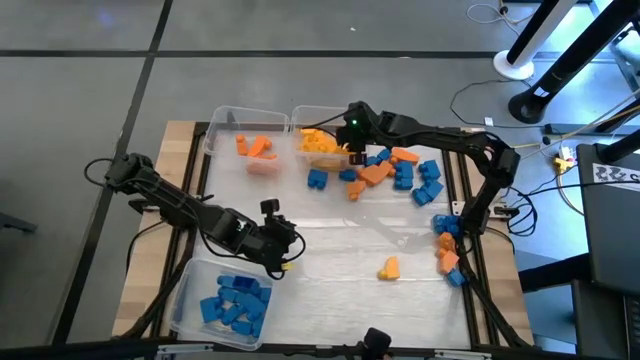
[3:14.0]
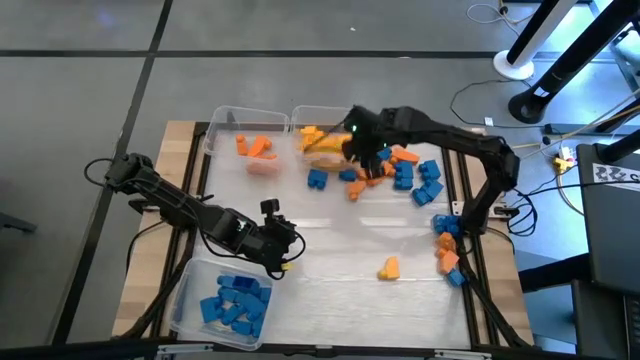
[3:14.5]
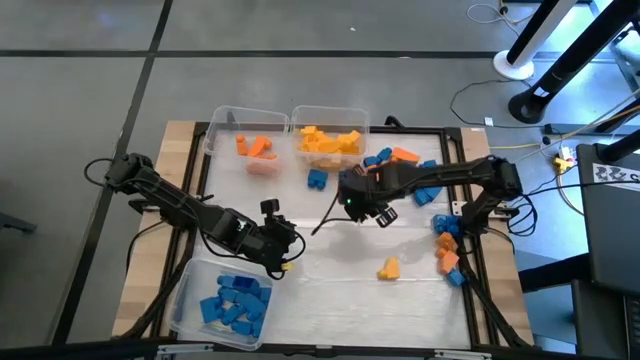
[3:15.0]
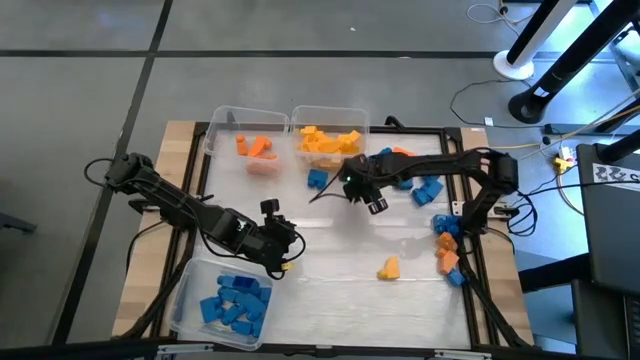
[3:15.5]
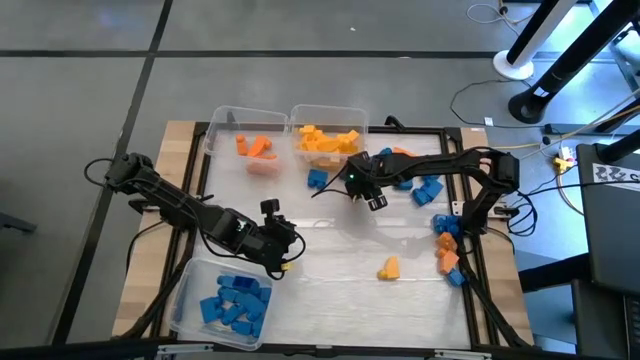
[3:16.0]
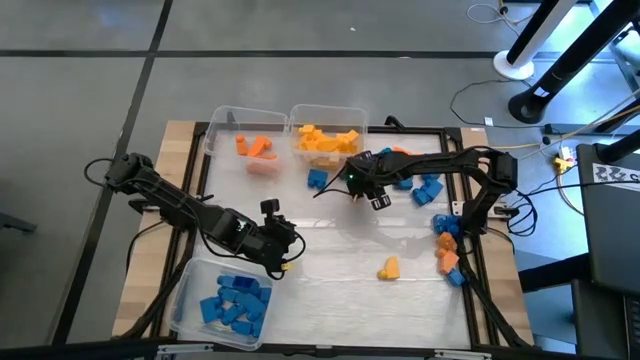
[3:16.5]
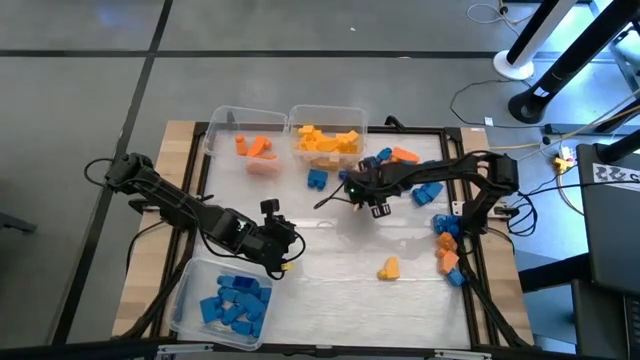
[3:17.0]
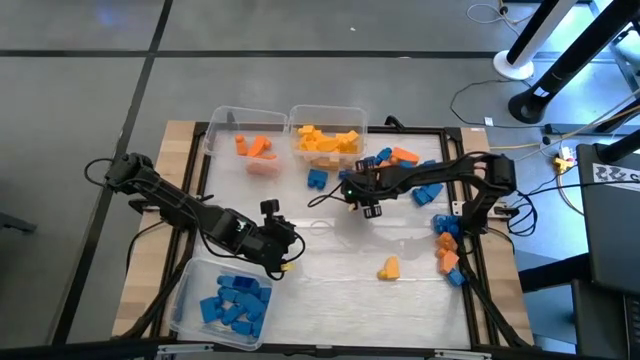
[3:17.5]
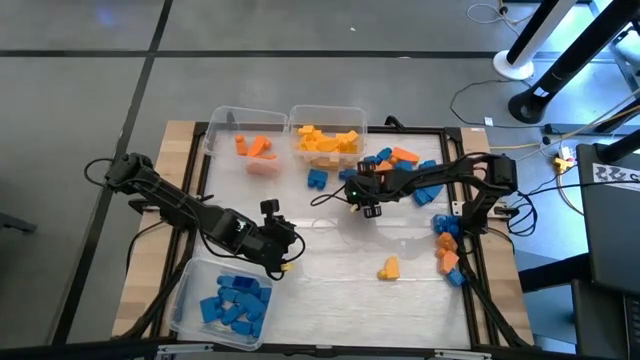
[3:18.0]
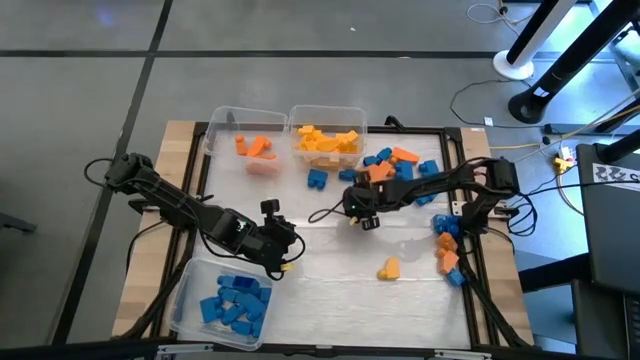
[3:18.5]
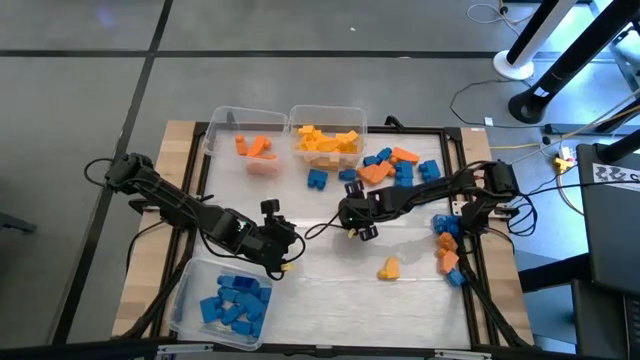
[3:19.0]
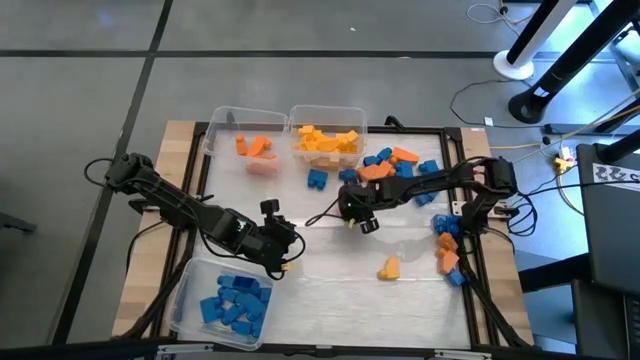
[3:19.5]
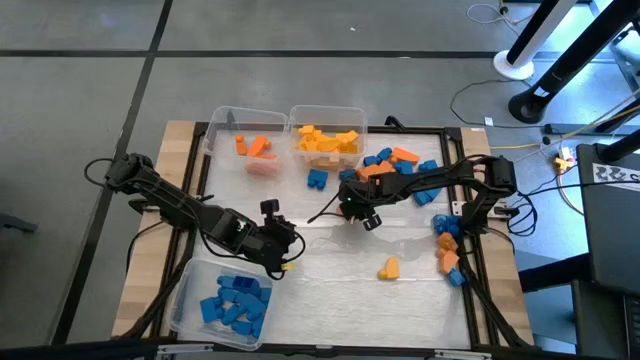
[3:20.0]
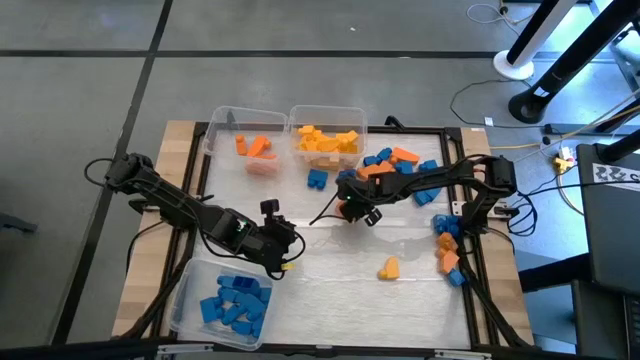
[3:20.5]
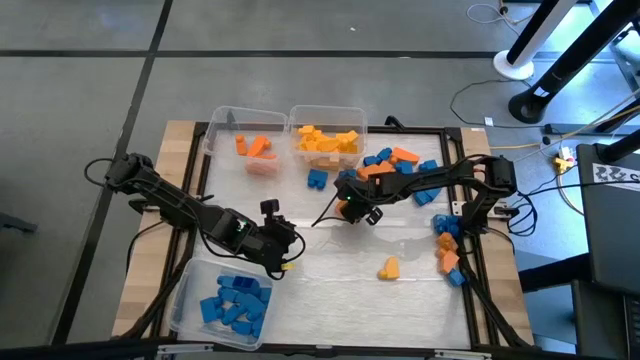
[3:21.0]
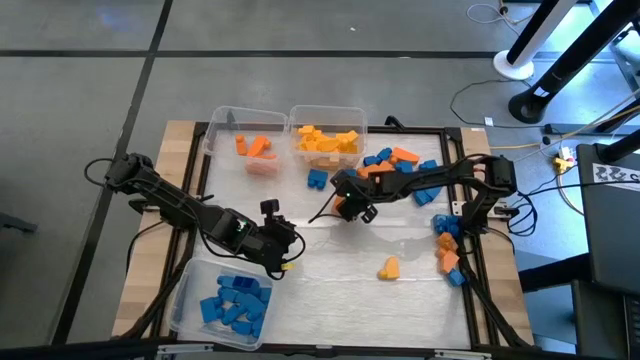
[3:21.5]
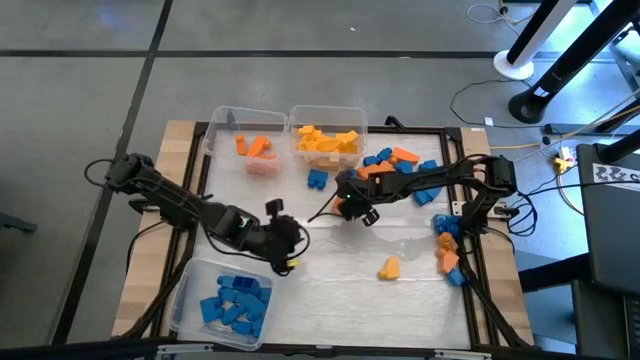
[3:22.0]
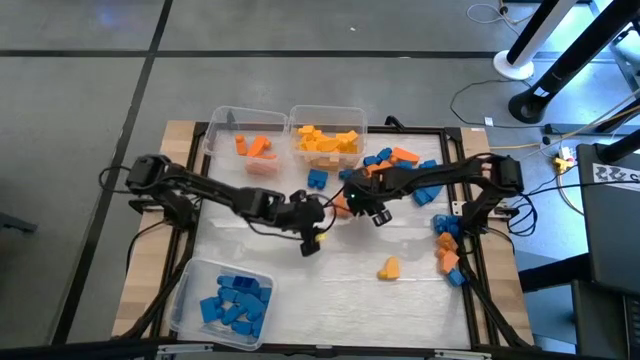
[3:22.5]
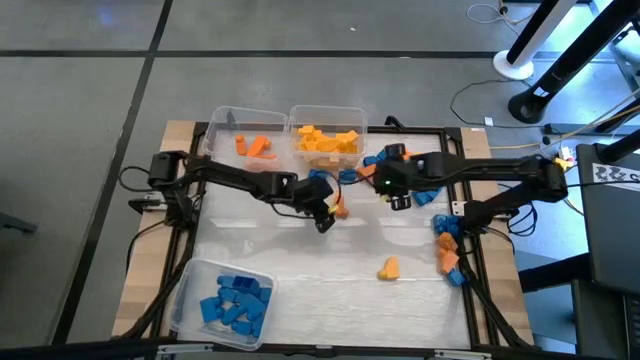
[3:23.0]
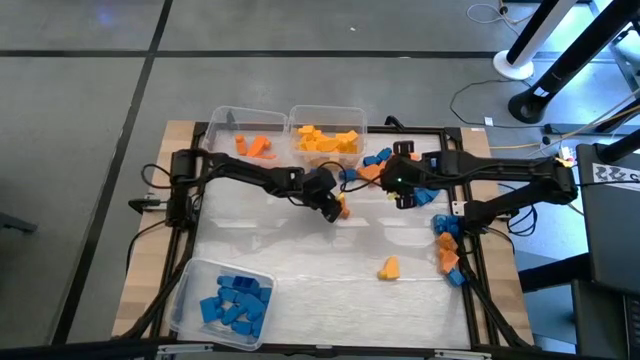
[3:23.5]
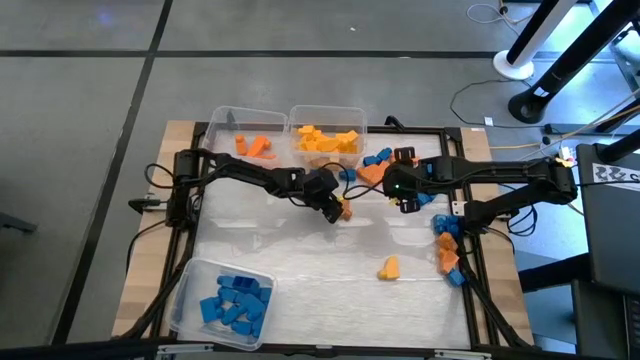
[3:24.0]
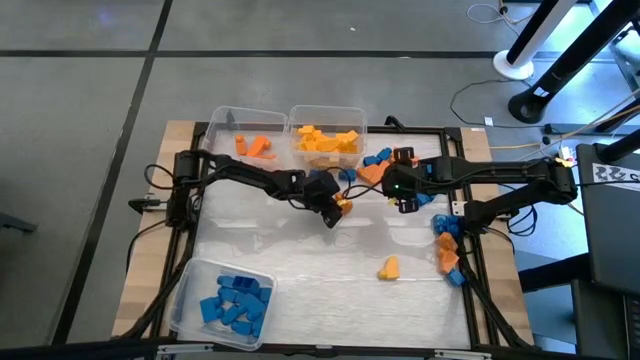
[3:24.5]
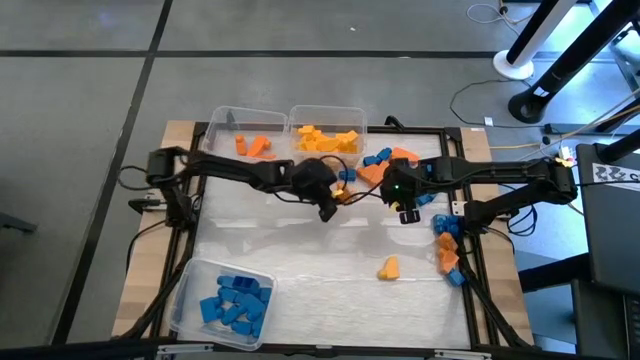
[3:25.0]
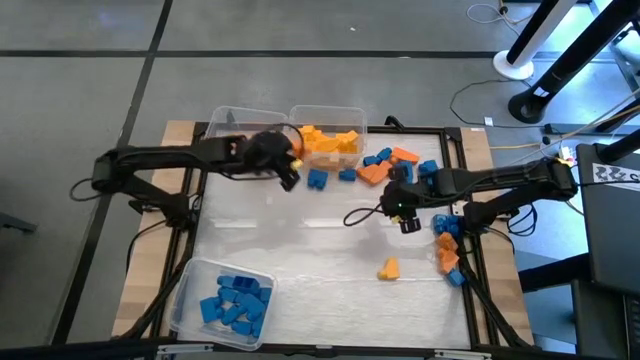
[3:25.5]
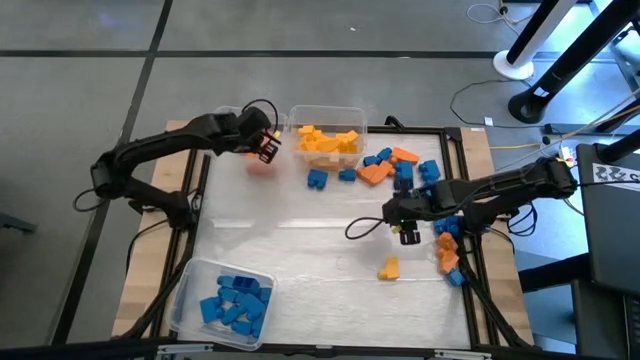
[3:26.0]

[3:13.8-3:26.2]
Task: Sort blocks
Put the orange game piece into the top left transparent bin

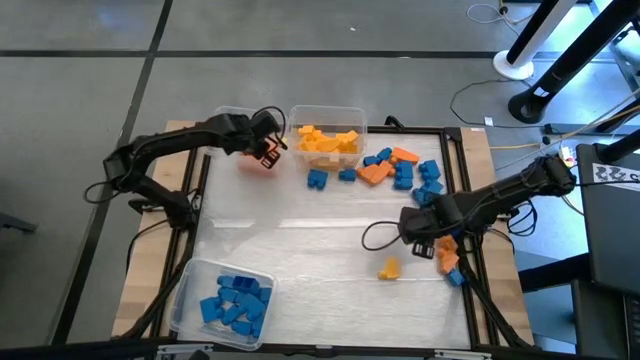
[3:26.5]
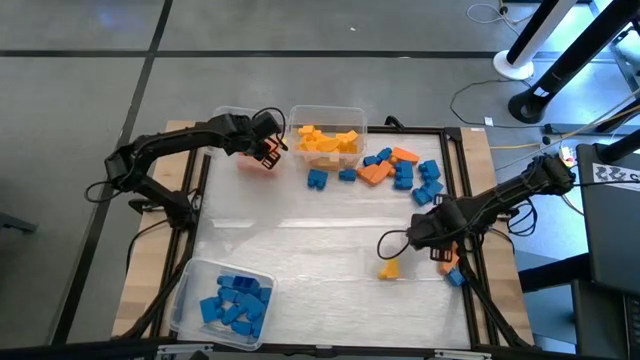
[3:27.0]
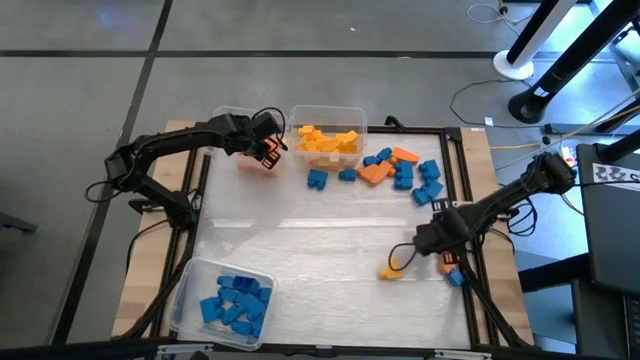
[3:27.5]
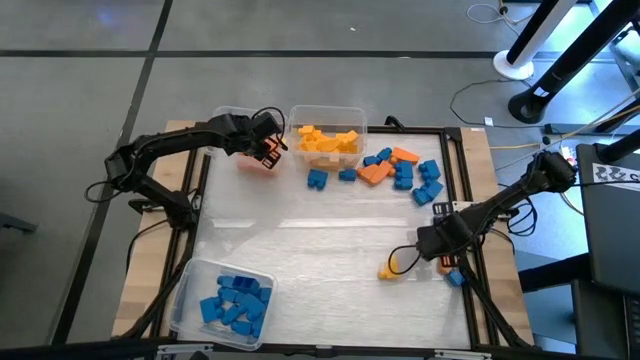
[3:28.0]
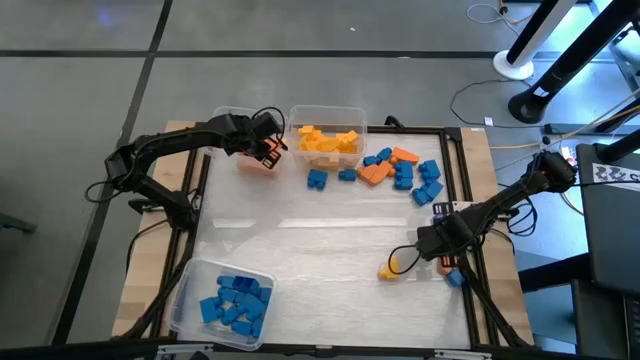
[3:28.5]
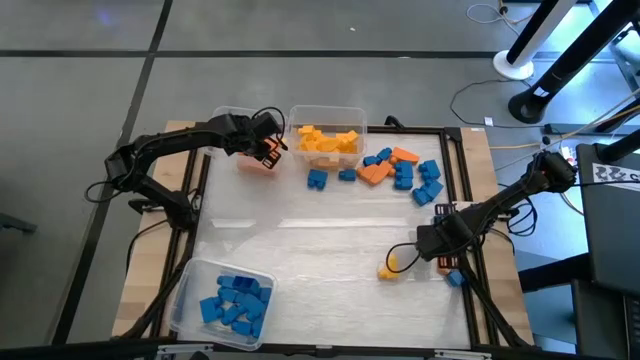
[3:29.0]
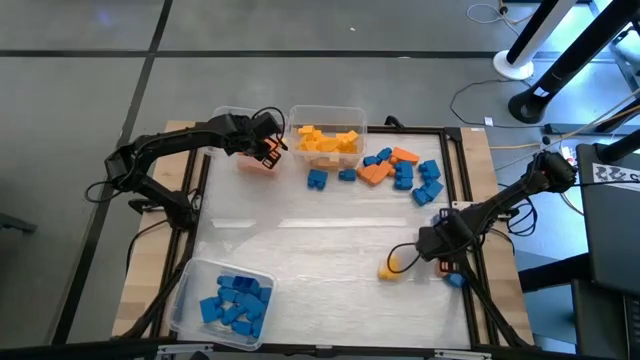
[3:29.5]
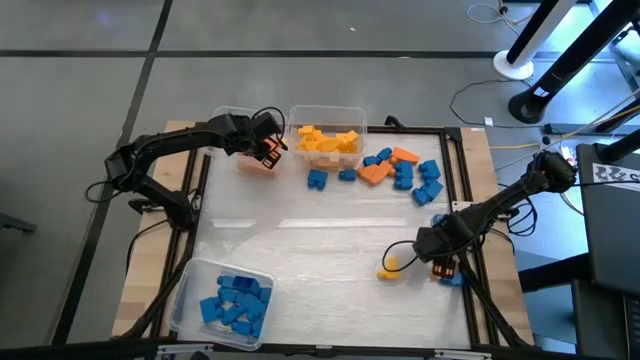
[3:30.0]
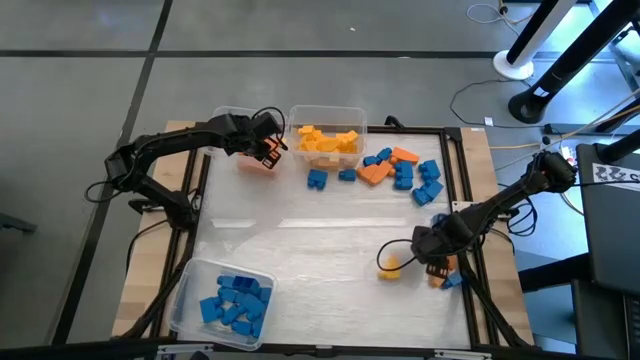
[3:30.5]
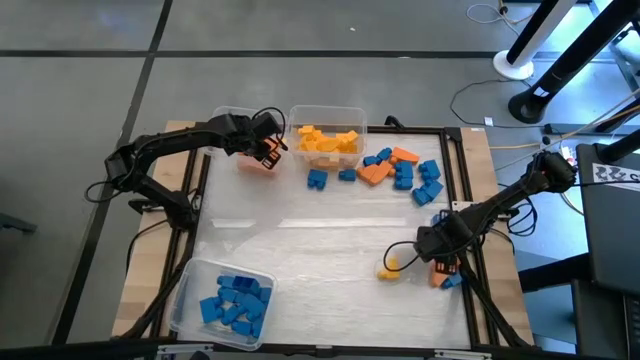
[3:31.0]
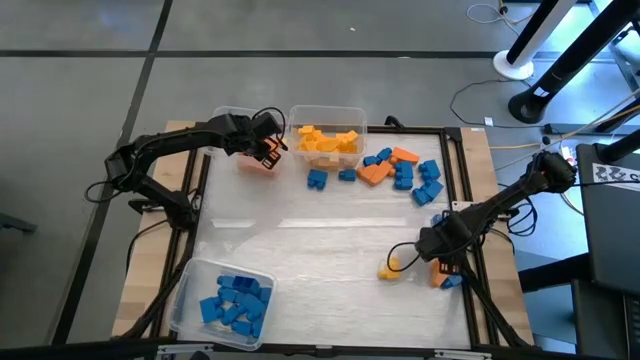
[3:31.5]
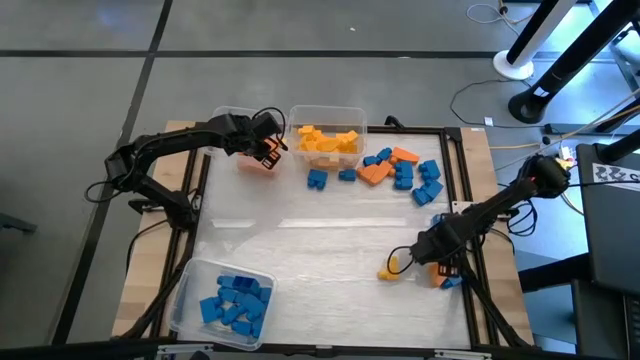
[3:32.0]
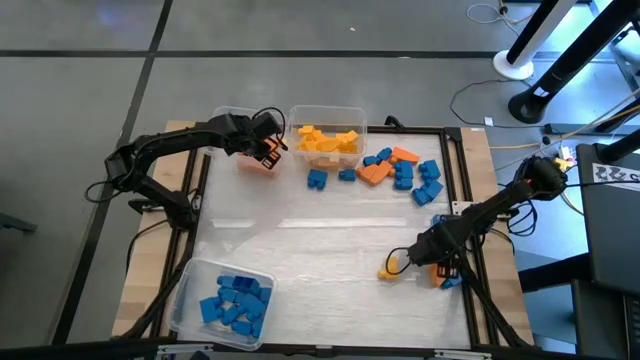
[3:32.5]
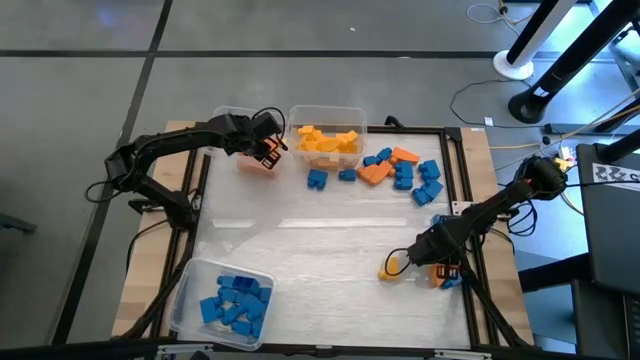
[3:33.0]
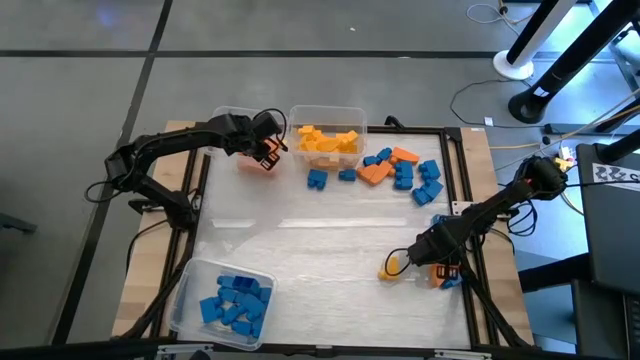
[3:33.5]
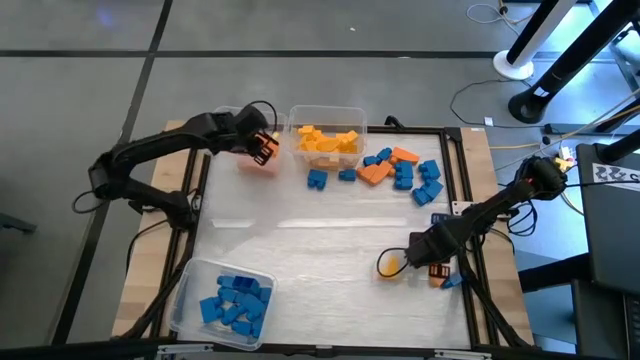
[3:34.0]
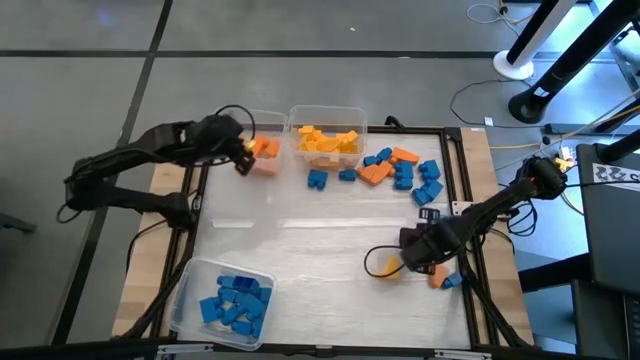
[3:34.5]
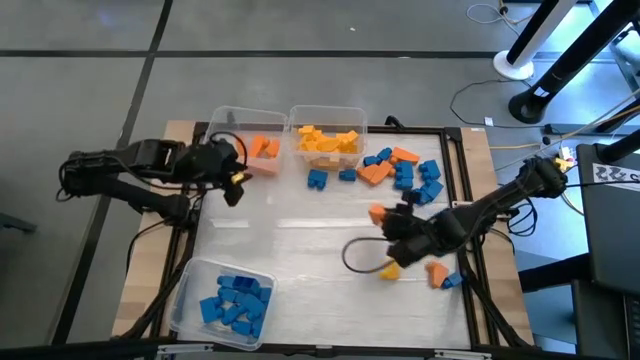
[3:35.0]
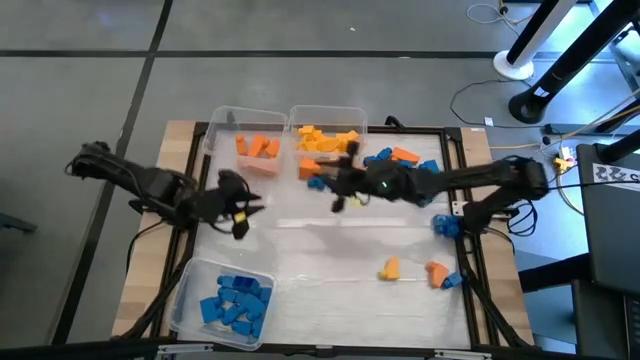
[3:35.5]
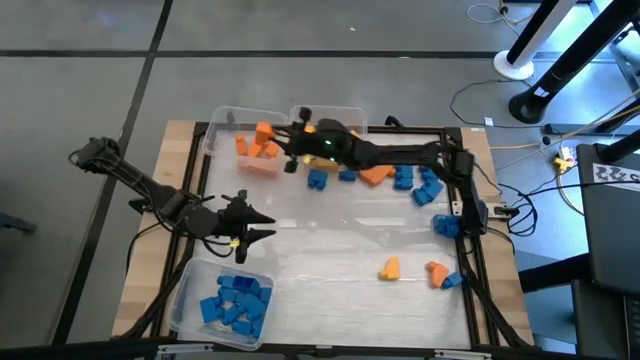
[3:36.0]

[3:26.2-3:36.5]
Put the orange game piece into the top left transparent bin
